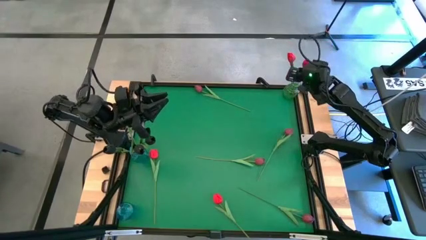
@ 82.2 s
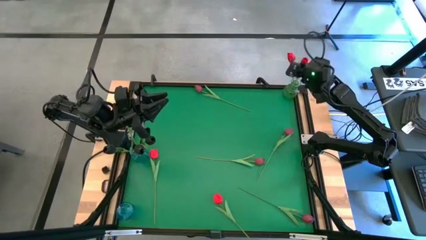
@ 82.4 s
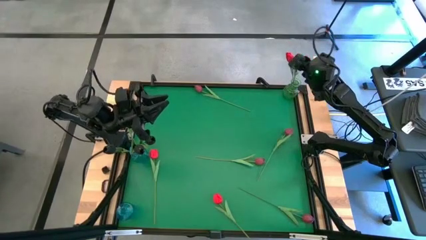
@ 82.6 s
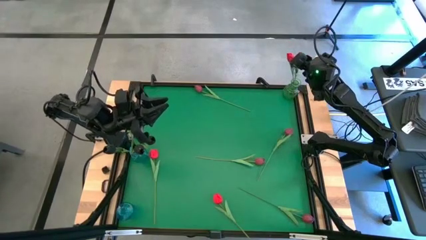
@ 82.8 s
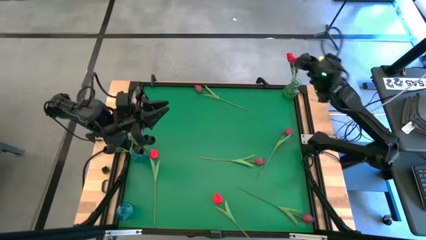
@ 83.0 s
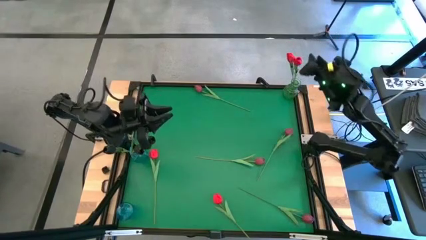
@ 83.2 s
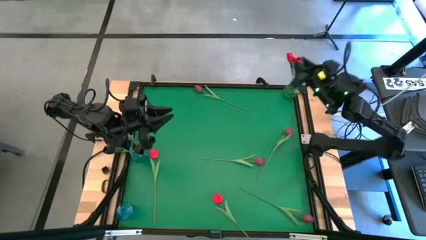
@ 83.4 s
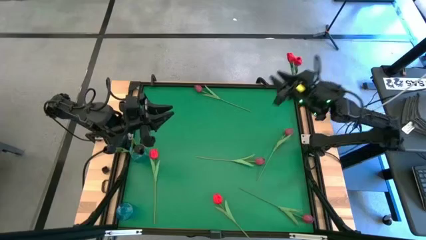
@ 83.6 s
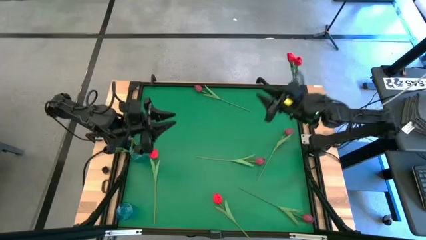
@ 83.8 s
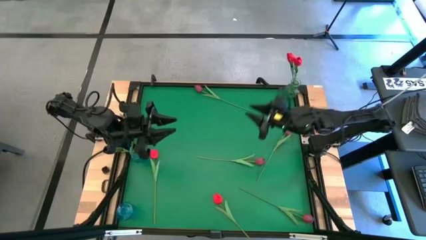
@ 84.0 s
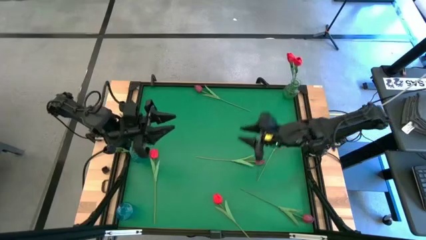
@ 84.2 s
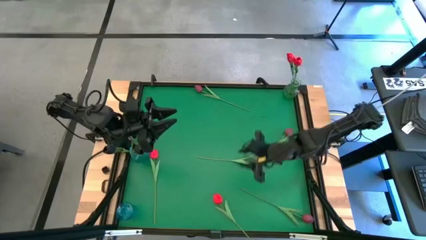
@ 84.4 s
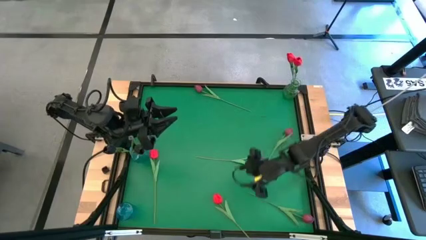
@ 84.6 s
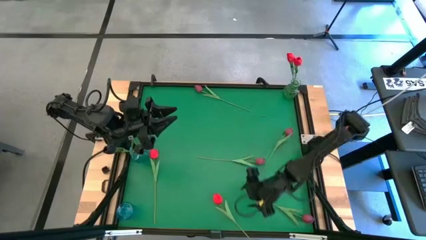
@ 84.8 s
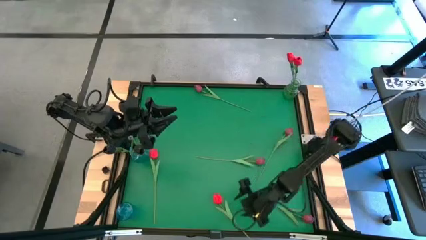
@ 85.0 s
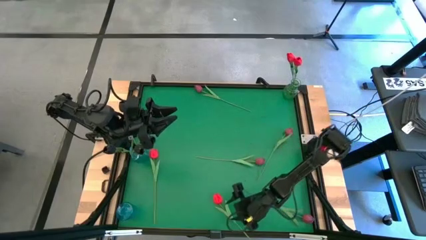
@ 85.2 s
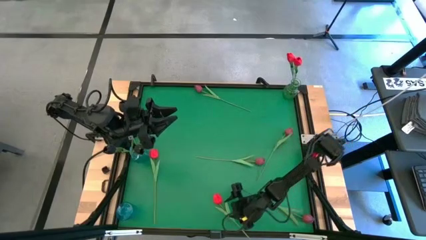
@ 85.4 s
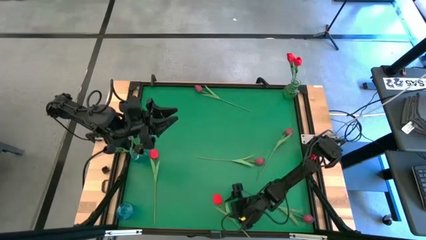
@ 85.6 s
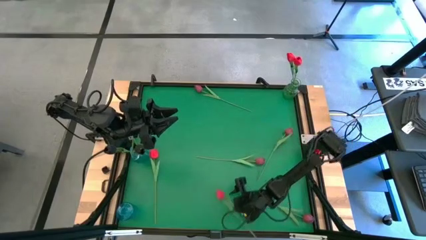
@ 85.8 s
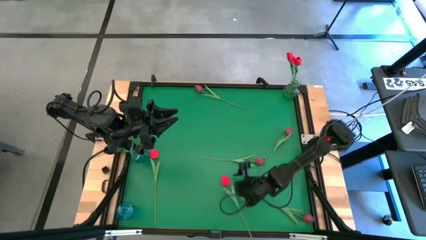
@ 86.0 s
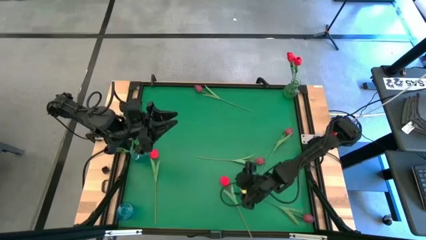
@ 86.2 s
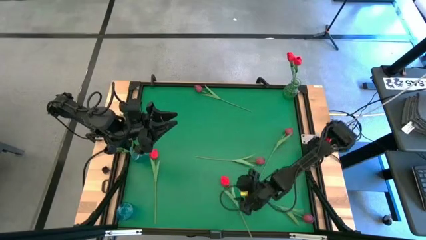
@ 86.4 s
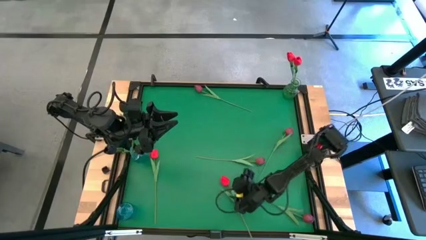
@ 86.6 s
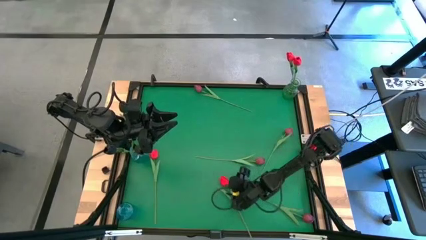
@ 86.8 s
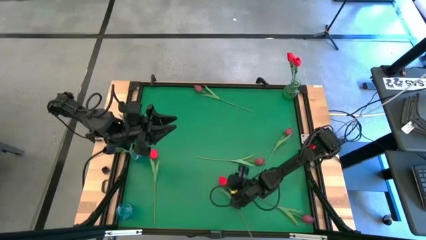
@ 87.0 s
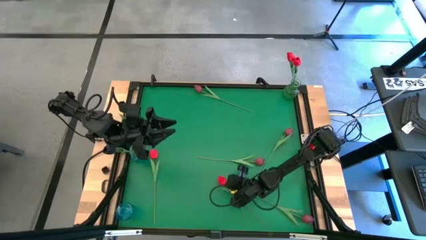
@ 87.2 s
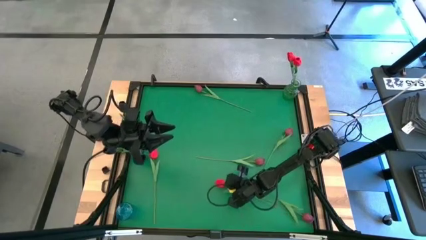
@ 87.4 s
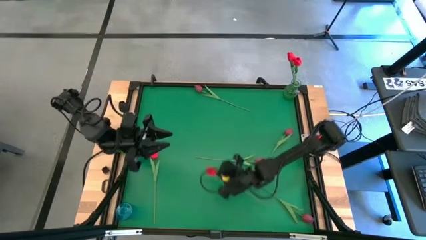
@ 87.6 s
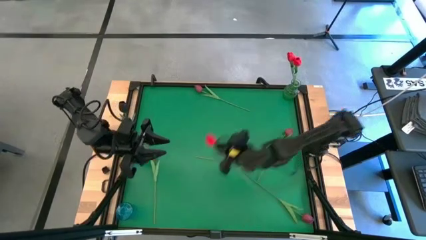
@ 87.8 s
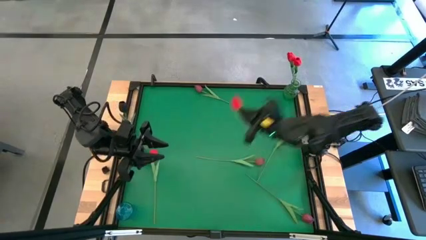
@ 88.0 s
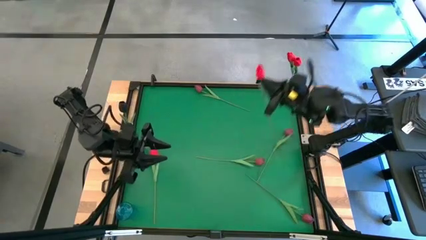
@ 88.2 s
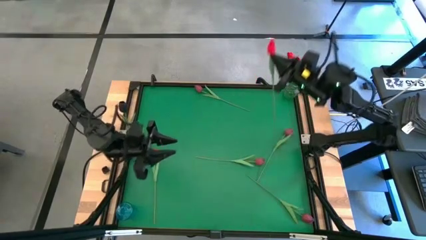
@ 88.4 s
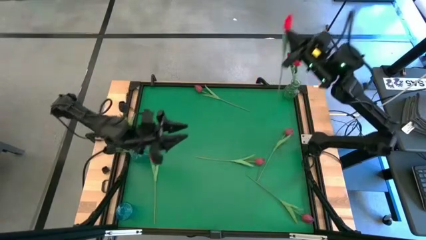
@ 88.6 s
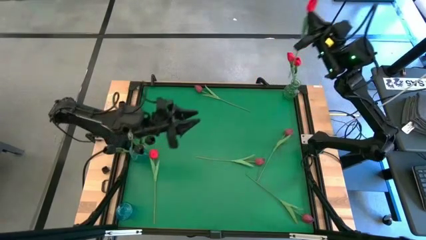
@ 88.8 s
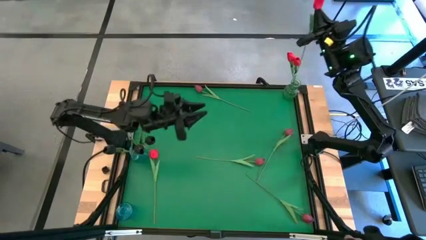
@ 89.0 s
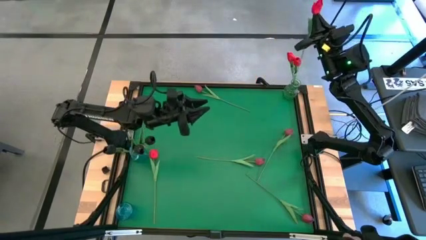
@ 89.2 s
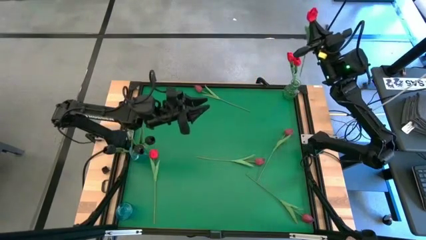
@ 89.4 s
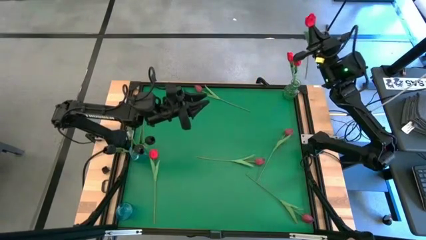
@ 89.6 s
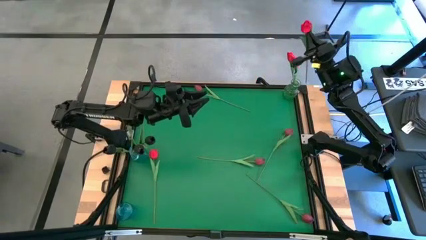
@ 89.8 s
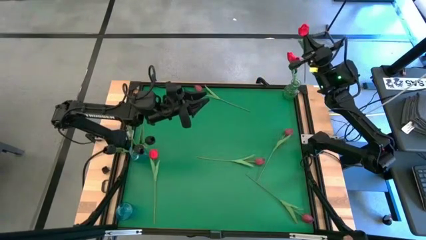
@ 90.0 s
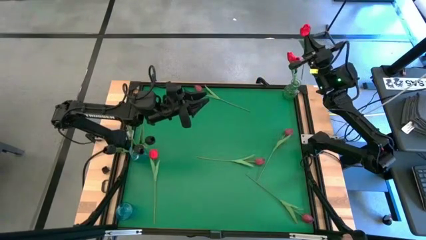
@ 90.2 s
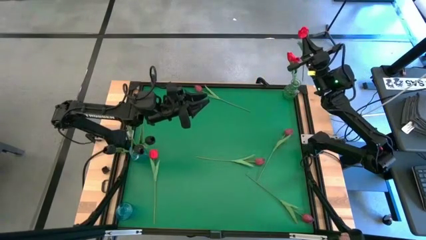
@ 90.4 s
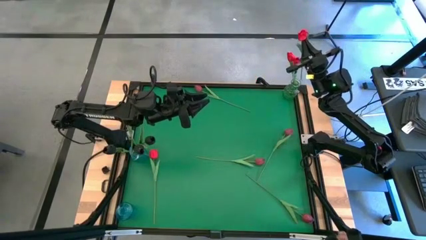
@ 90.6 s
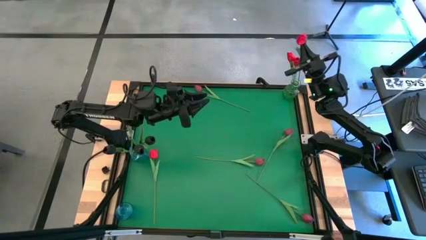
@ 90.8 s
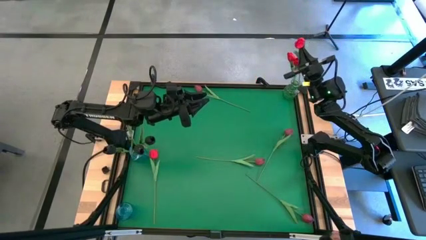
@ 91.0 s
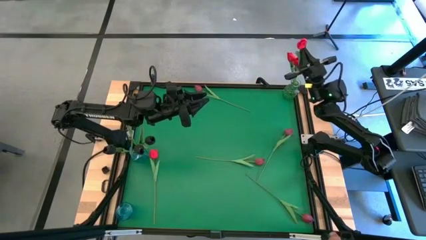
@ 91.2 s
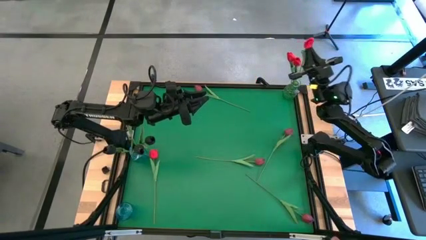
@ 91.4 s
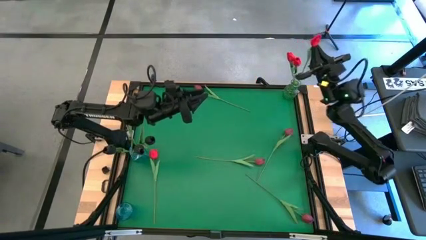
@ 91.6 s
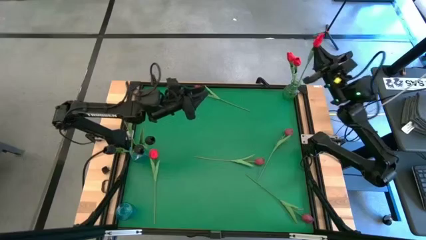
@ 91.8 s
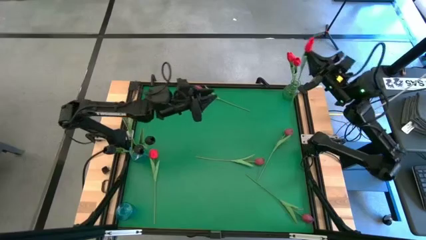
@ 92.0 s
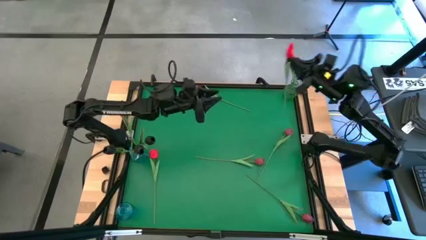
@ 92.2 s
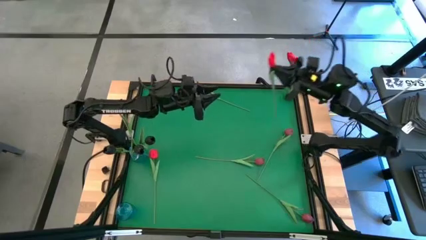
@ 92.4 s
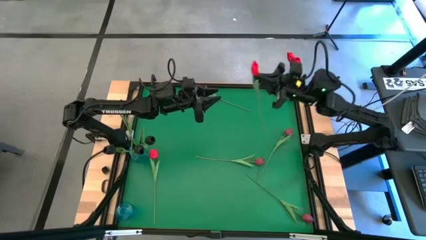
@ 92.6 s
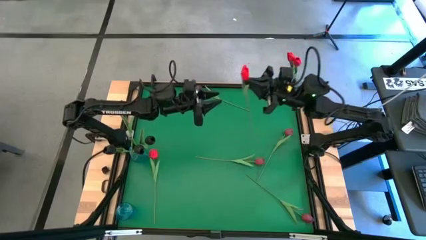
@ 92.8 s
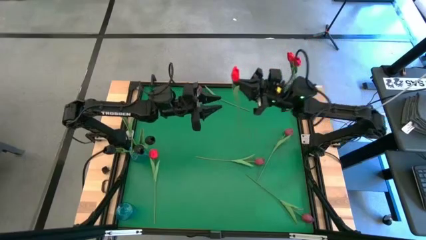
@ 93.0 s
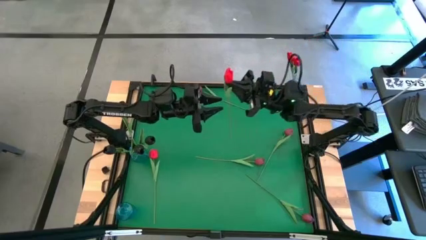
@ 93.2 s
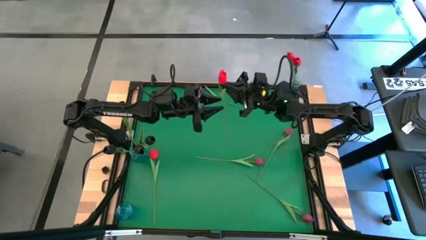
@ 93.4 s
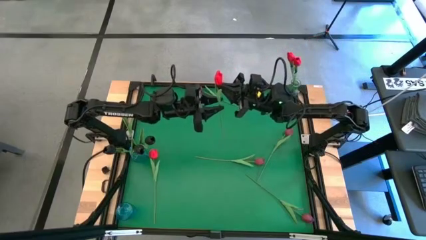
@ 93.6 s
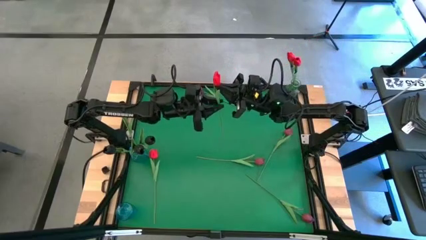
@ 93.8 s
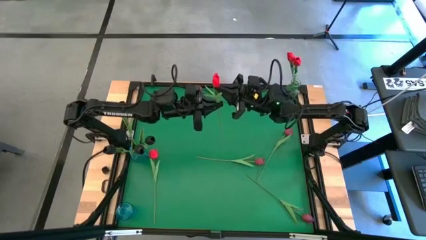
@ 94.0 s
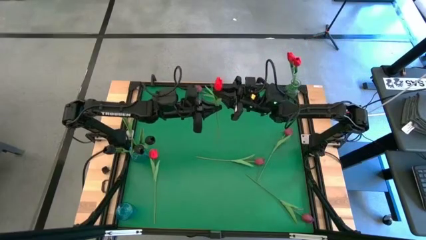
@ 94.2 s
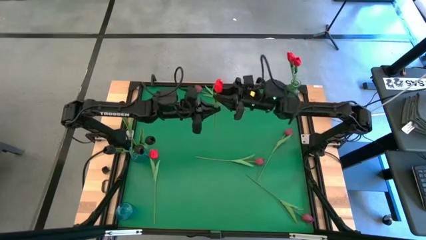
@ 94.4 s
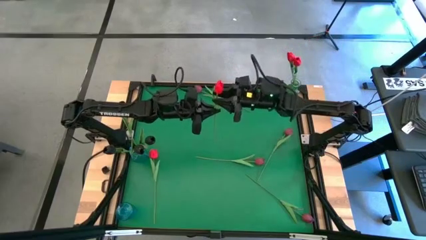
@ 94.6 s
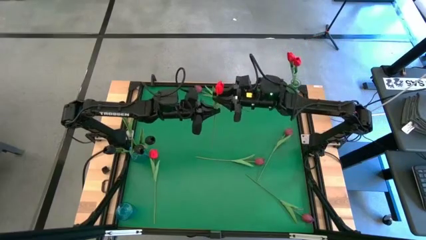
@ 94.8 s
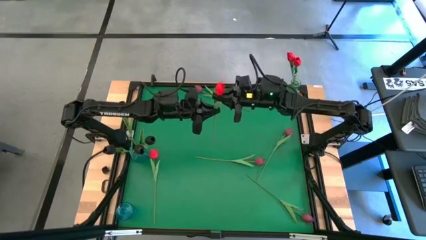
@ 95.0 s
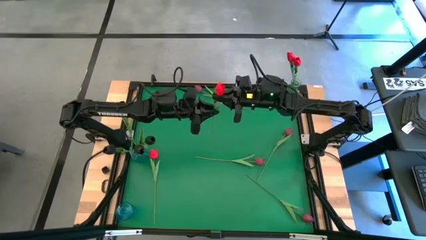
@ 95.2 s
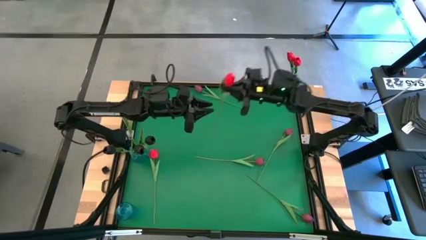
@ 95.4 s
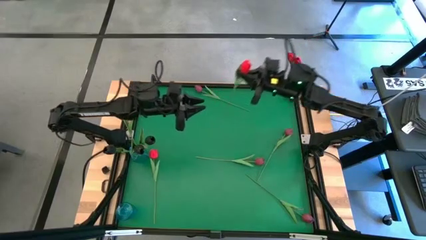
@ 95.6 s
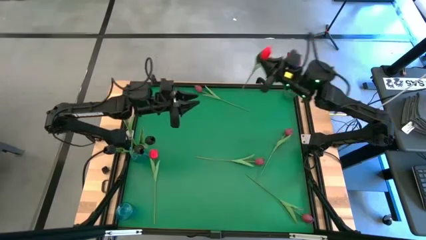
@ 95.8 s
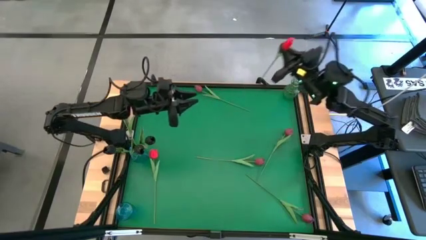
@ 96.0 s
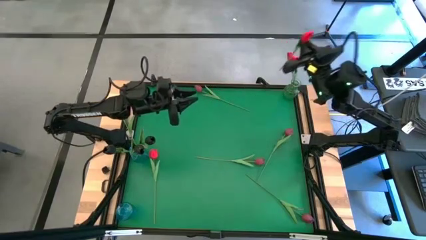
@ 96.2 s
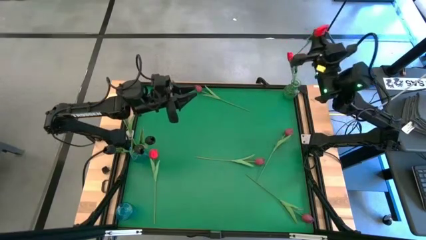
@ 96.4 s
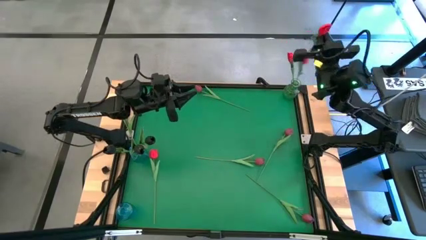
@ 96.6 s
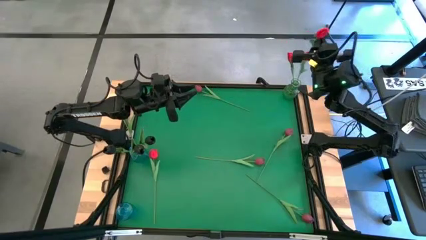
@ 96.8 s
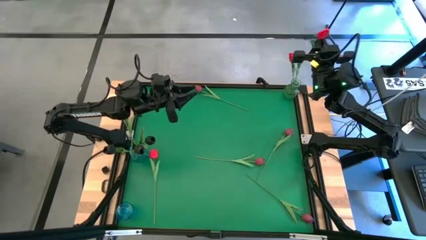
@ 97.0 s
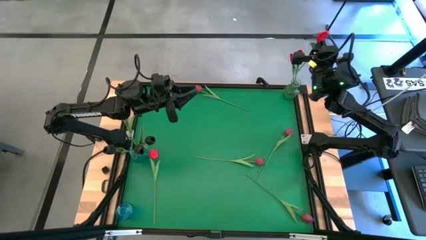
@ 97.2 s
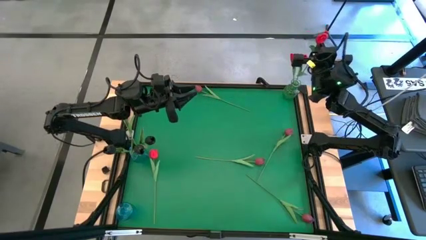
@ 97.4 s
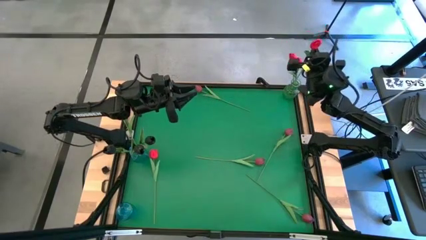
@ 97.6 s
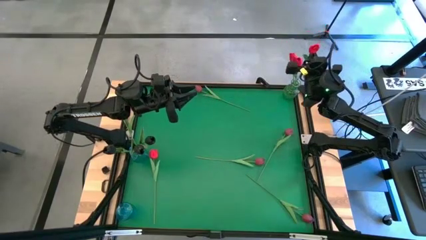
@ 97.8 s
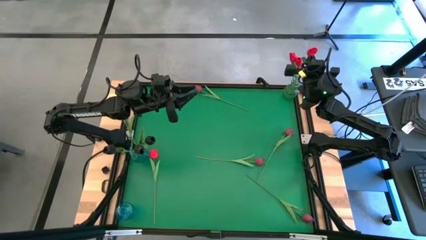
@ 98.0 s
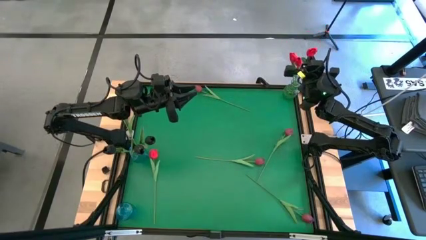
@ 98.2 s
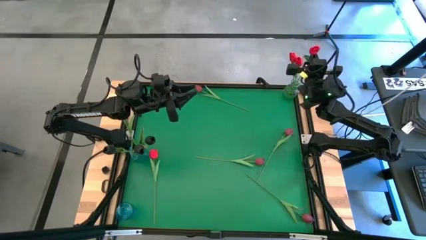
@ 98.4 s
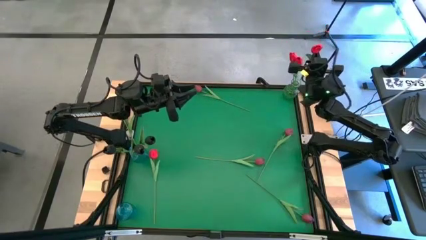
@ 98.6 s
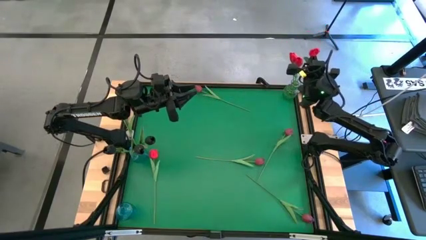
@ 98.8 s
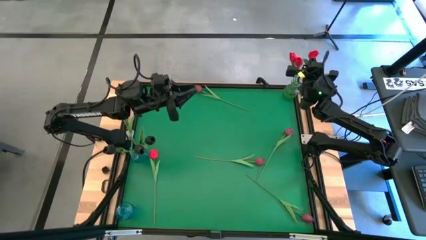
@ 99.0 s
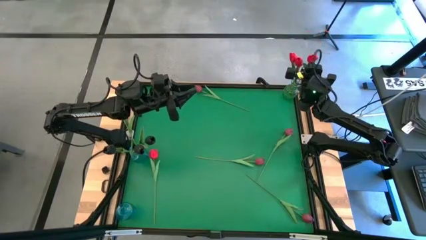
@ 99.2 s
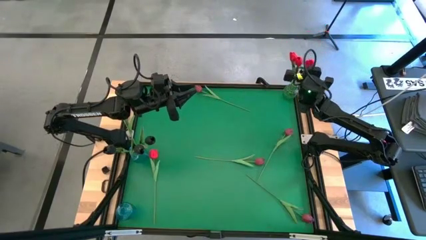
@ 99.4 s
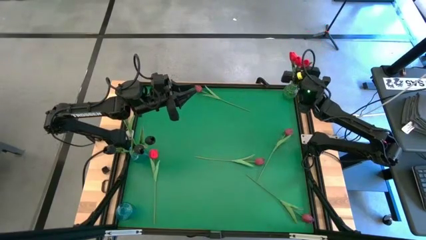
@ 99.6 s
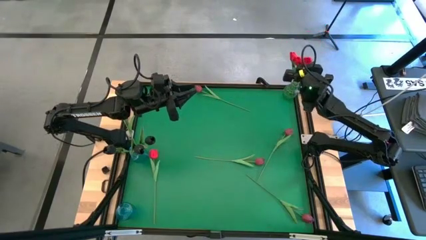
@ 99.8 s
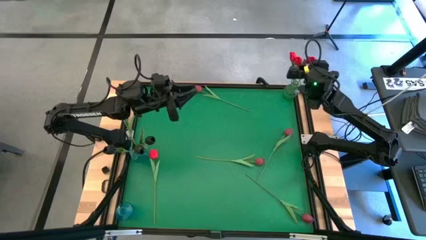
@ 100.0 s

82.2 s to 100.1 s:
Task: Sort flowers into vase by color
Put the red tulip into the green vase
